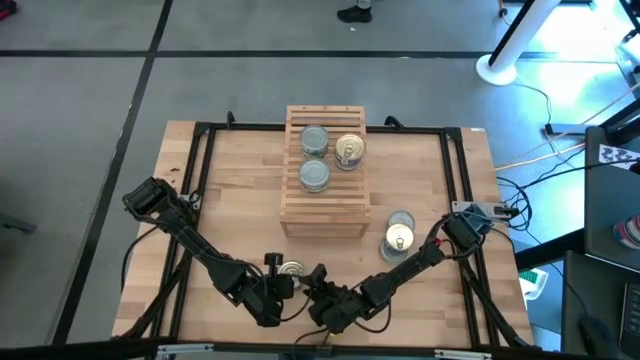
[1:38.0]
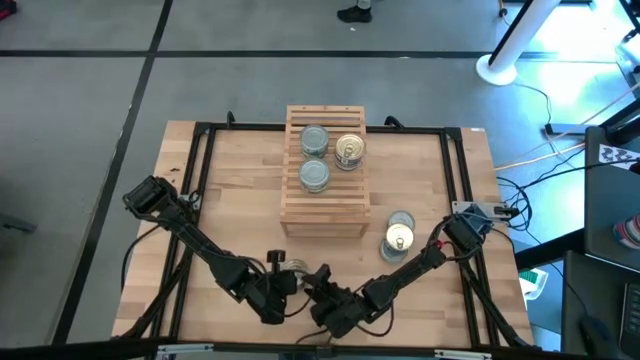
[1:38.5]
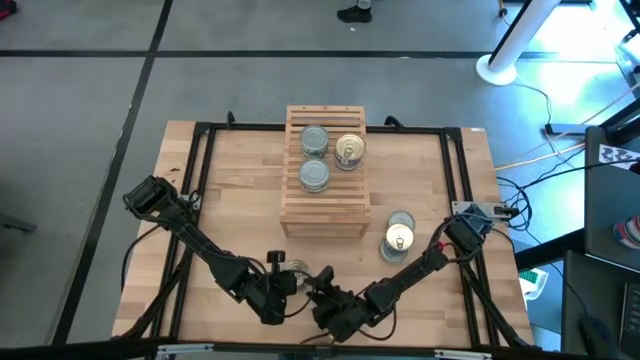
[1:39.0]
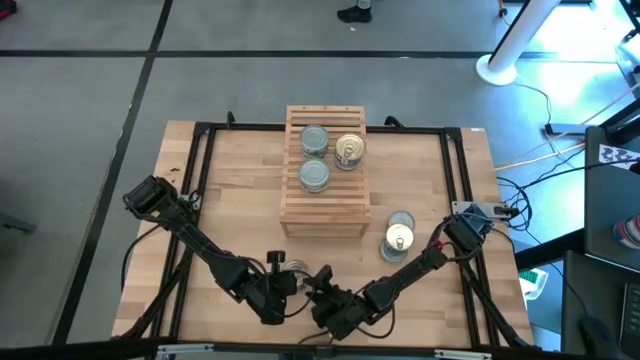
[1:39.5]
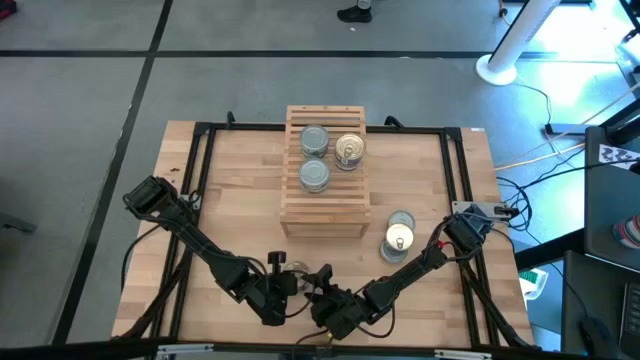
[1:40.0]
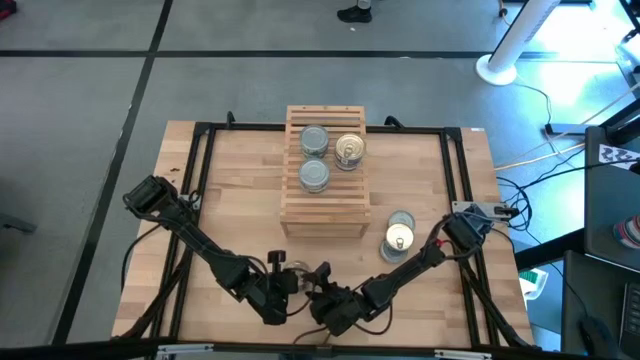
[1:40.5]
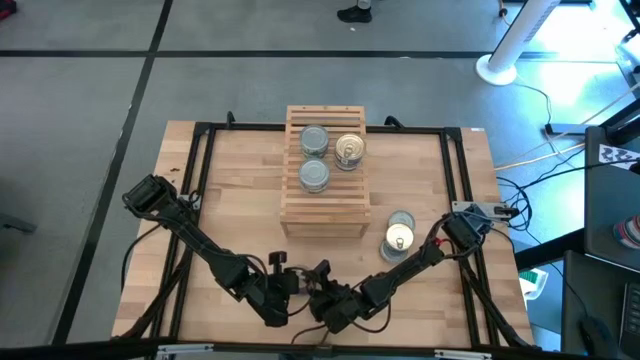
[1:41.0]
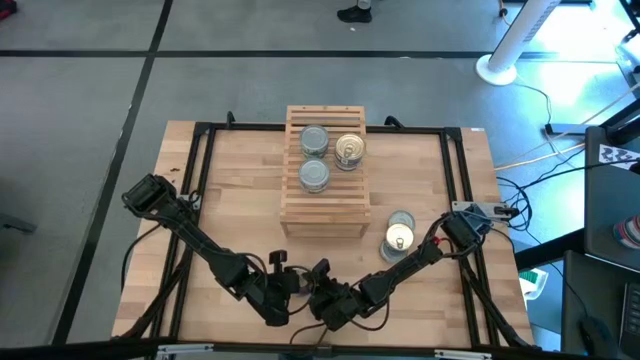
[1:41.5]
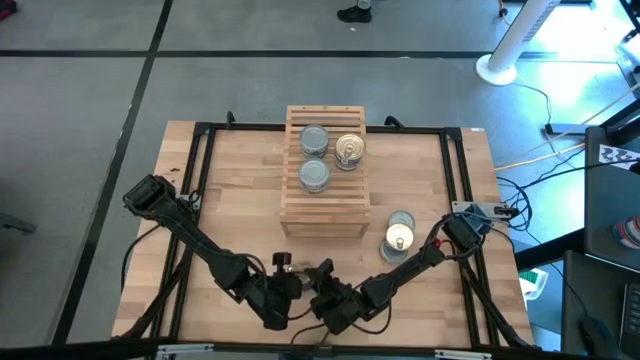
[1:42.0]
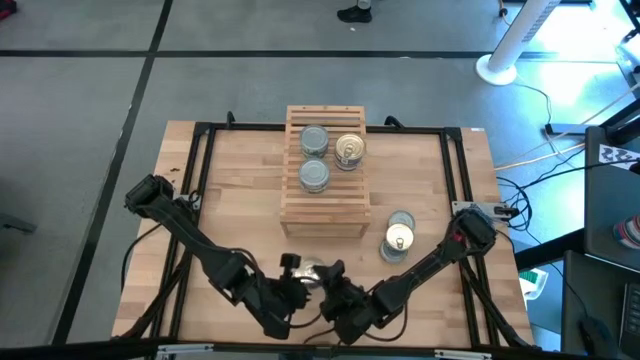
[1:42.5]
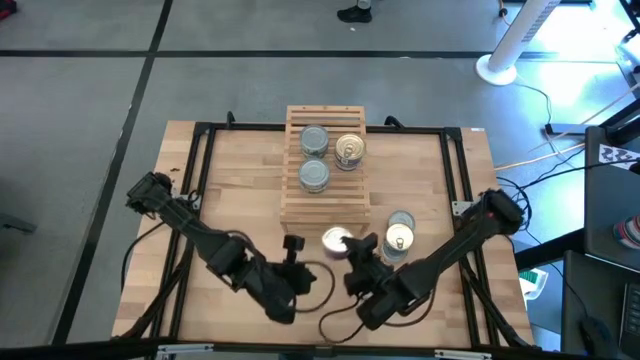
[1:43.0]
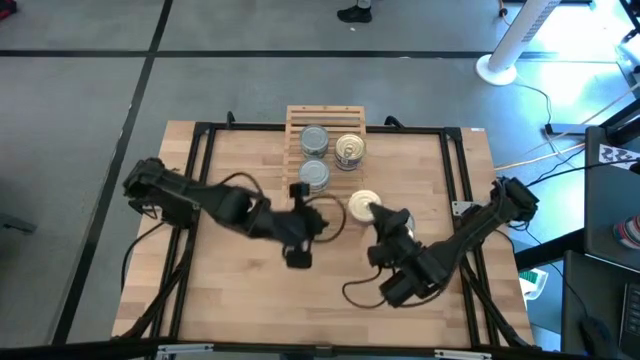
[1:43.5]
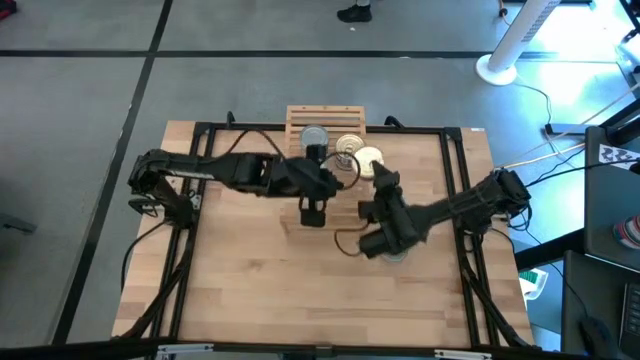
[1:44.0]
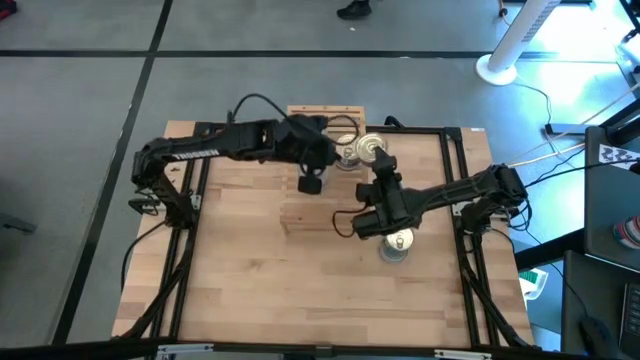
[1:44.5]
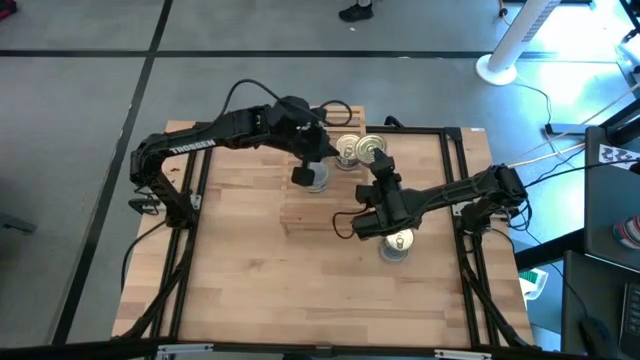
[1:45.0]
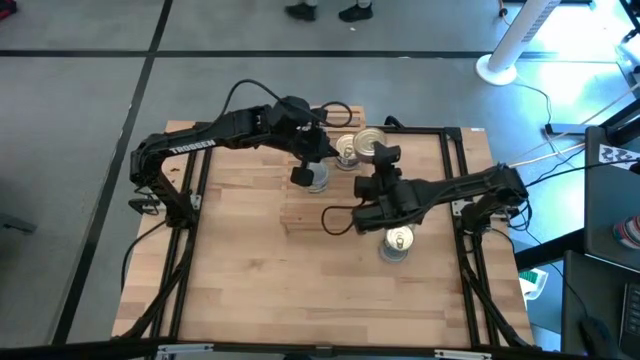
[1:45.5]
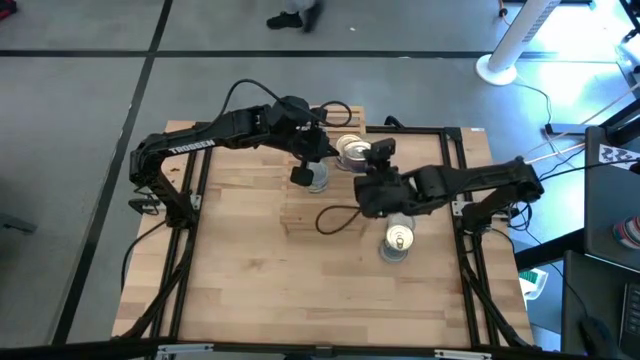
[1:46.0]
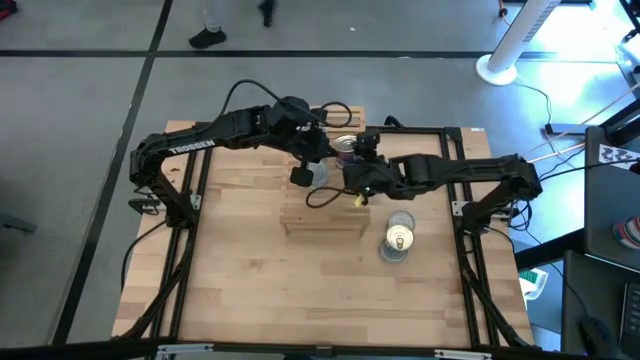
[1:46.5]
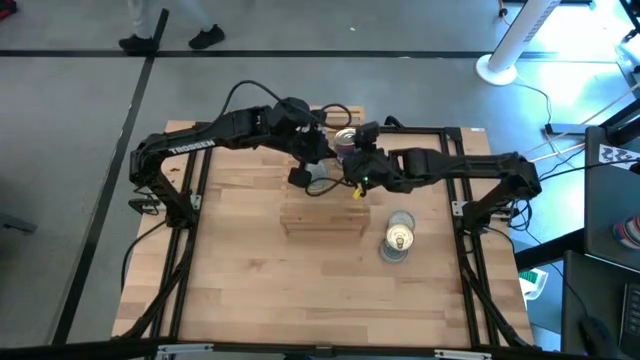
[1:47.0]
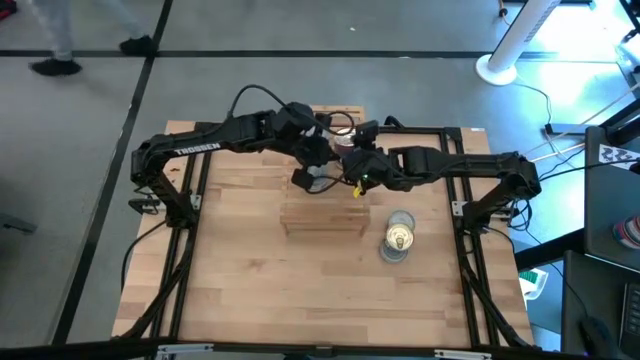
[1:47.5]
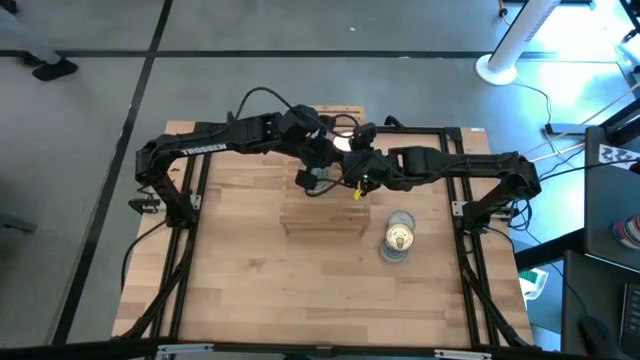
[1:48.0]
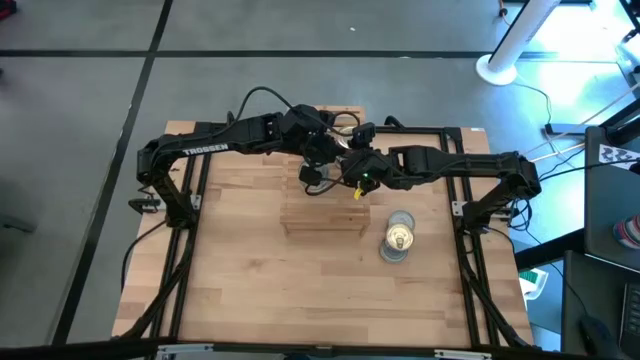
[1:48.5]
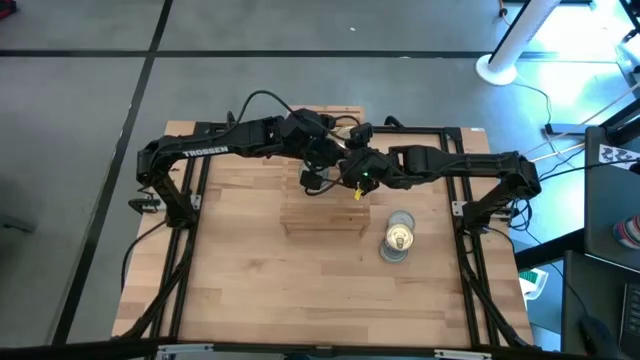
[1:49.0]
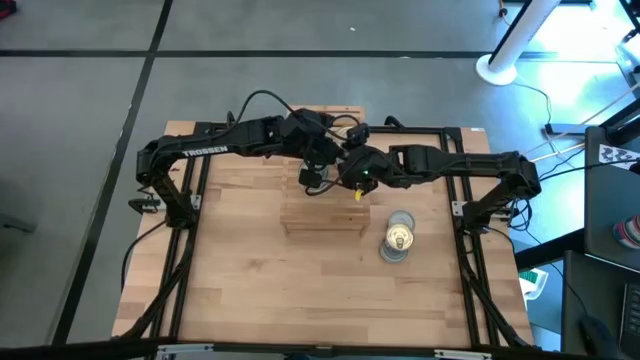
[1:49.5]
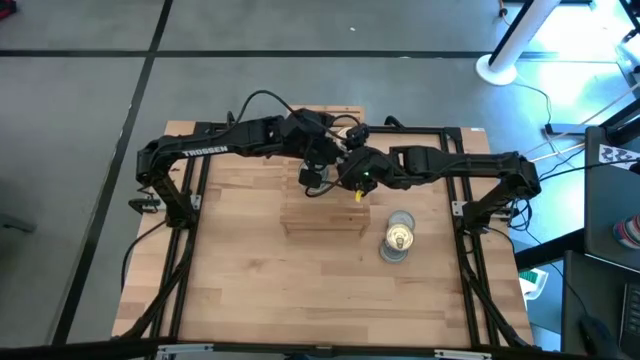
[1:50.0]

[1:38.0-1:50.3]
Task: Stack canned seafood by type on shelf
Stack the blue tuna can on top of the blue tuna can on the shelf

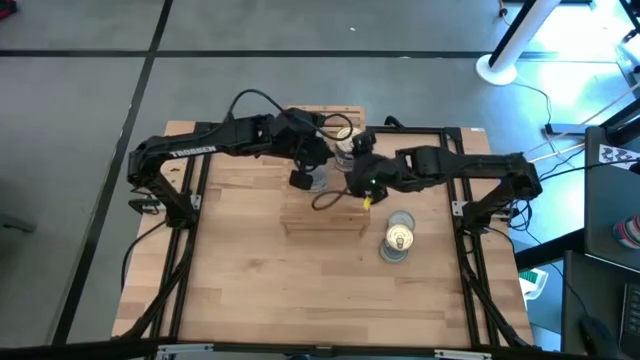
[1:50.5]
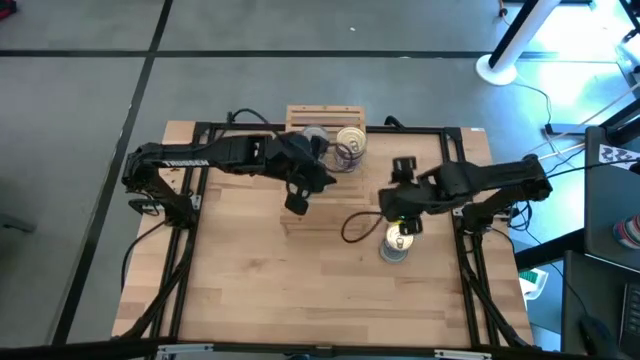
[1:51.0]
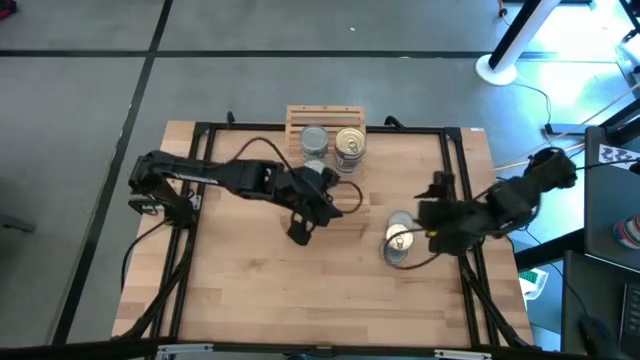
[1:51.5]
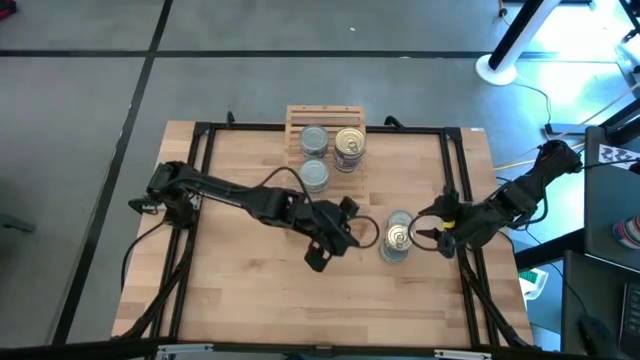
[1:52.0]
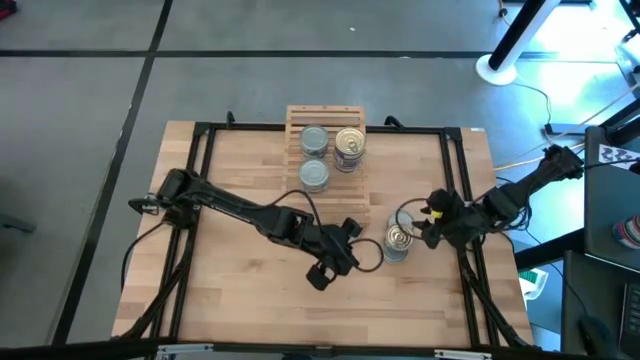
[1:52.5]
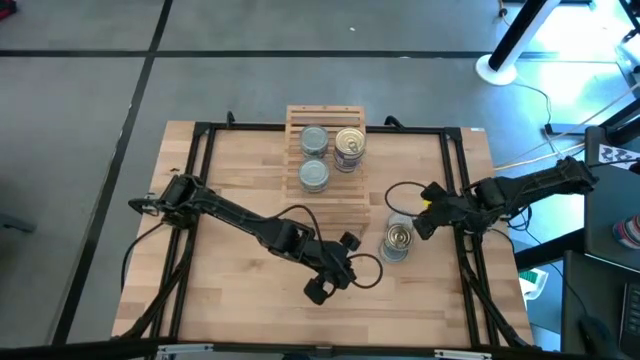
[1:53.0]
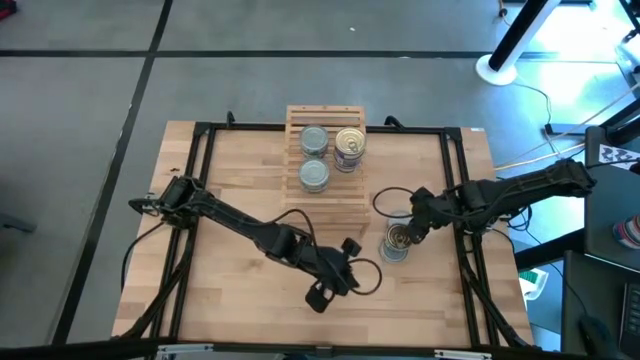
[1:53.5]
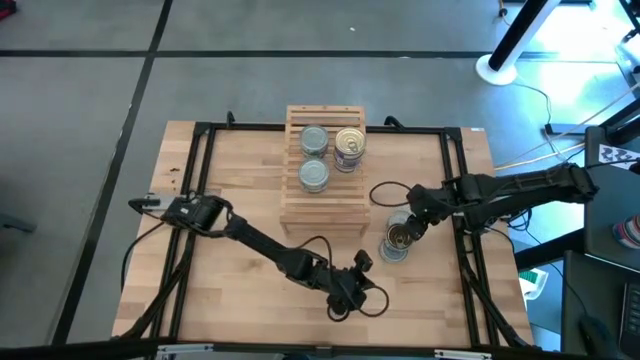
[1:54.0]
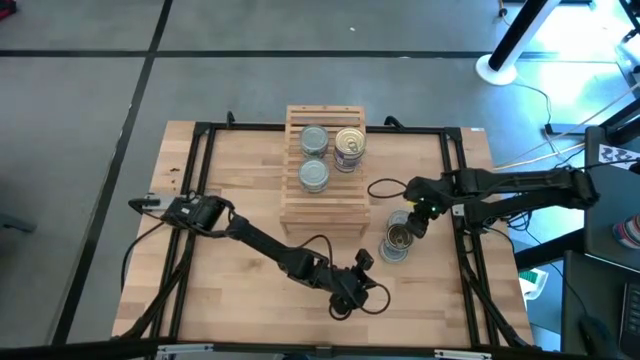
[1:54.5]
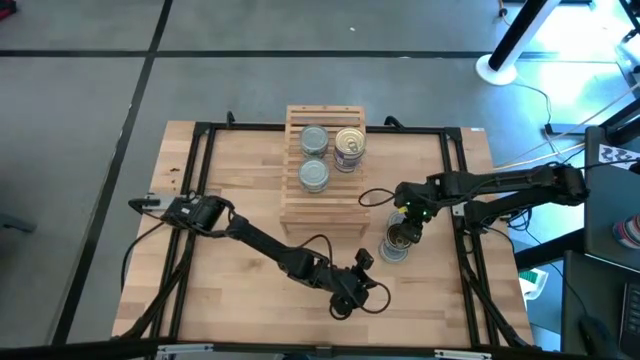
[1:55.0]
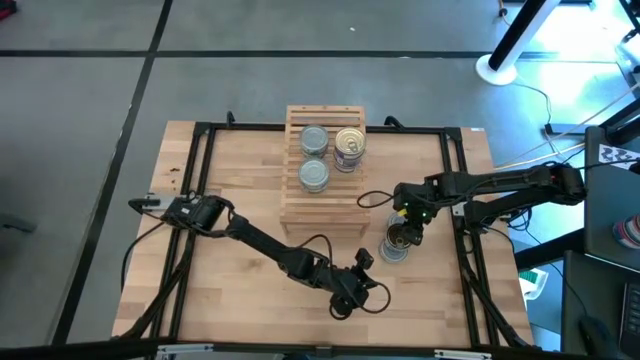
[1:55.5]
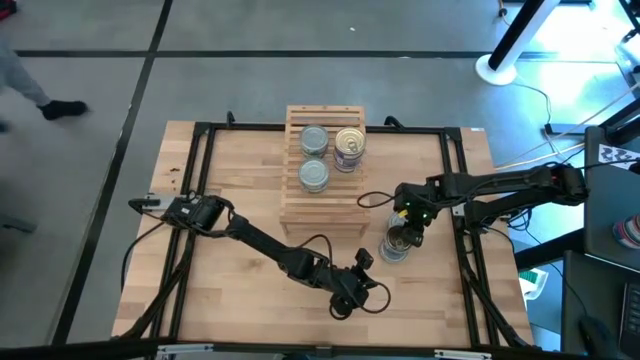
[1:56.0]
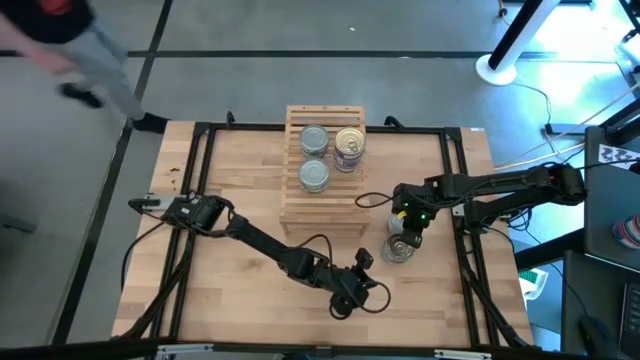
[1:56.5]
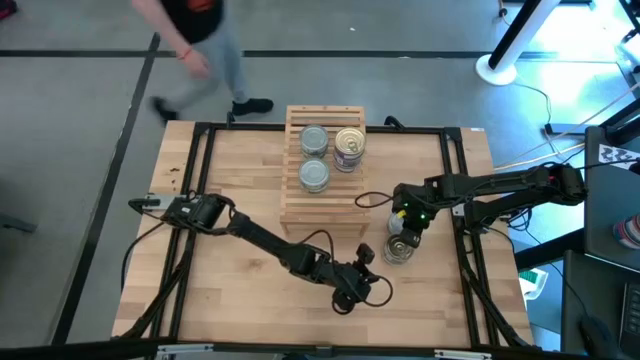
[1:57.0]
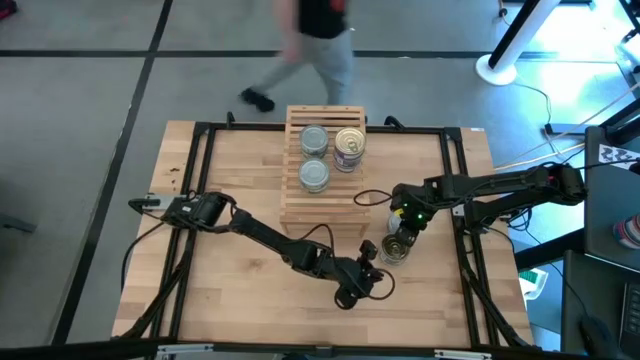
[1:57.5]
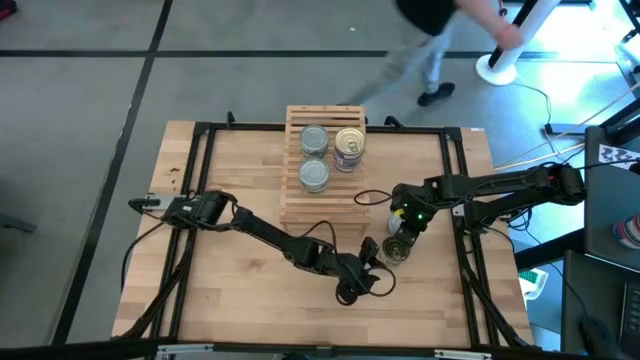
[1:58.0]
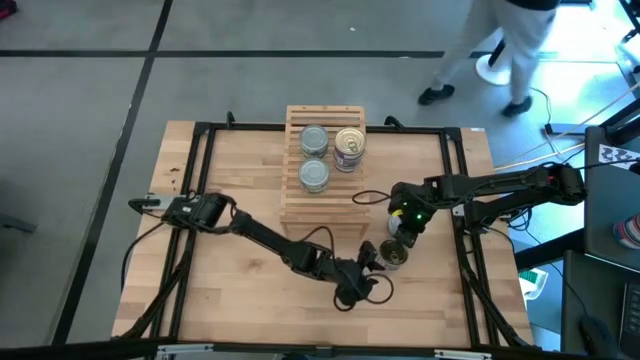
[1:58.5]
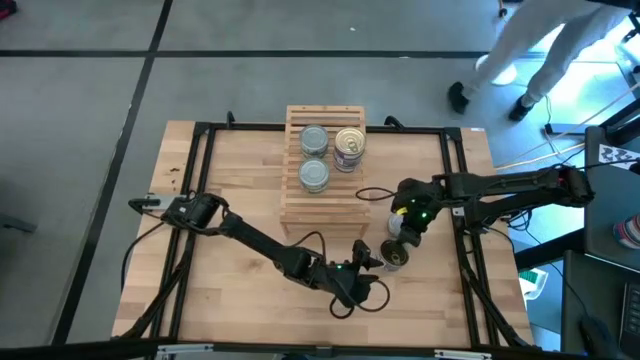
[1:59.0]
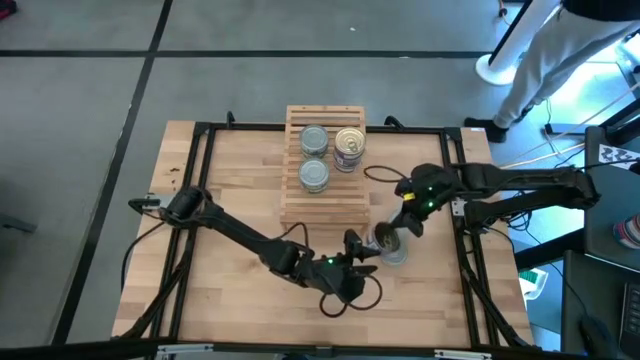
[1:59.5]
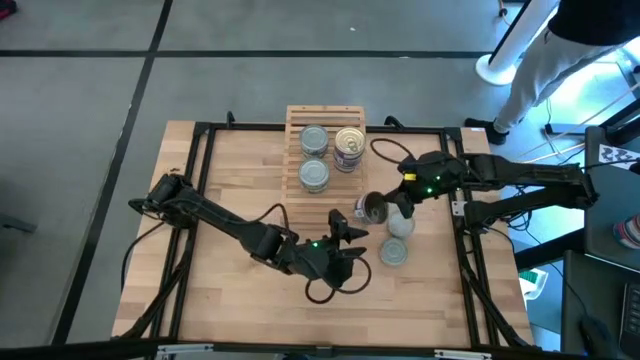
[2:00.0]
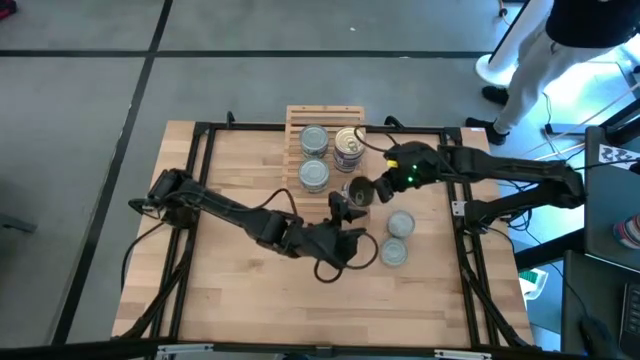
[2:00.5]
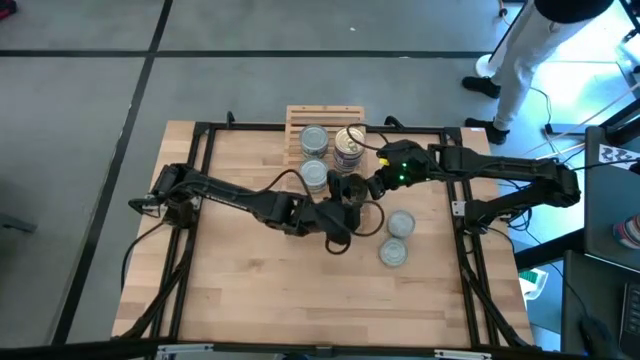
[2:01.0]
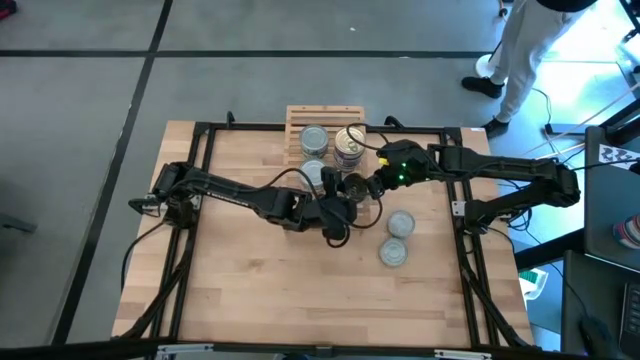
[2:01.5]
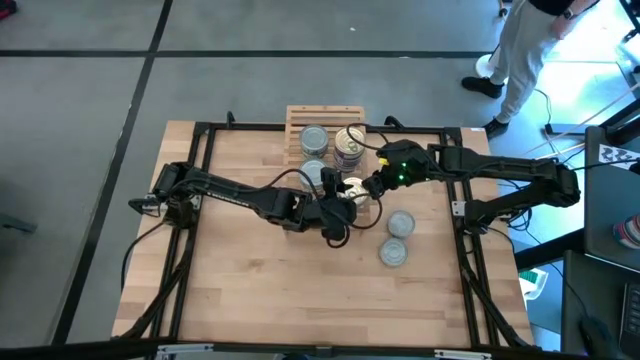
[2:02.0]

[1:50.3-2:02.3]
Put the blue tuna can on the shelf aligned with other blue tuna can
